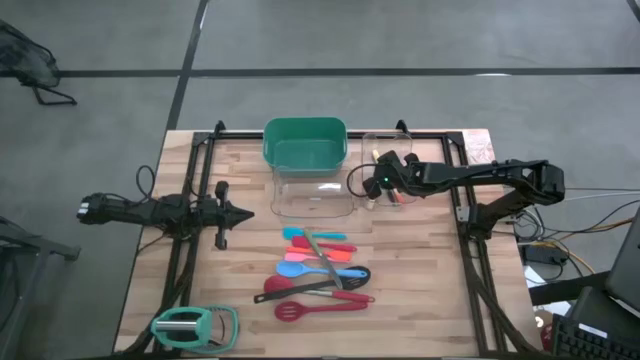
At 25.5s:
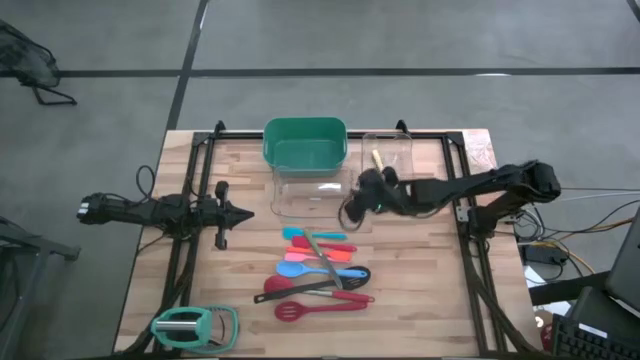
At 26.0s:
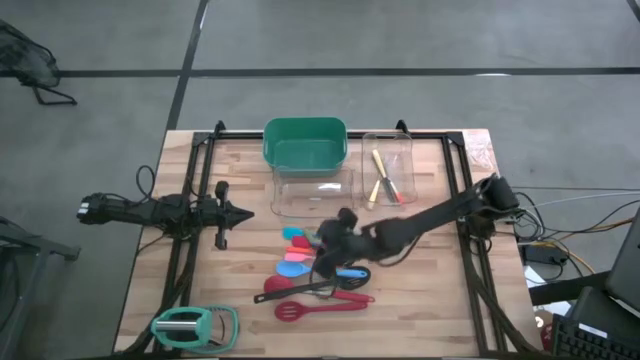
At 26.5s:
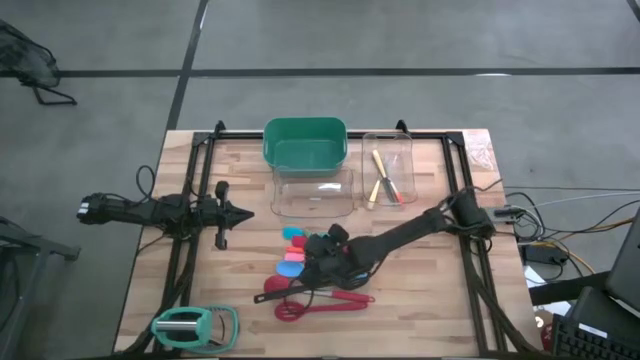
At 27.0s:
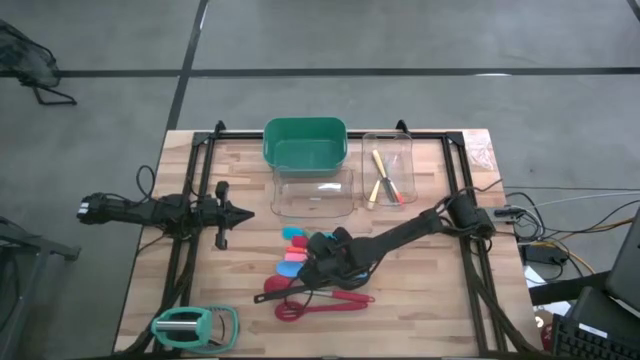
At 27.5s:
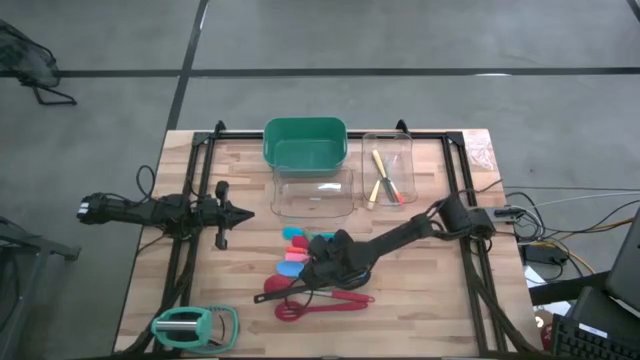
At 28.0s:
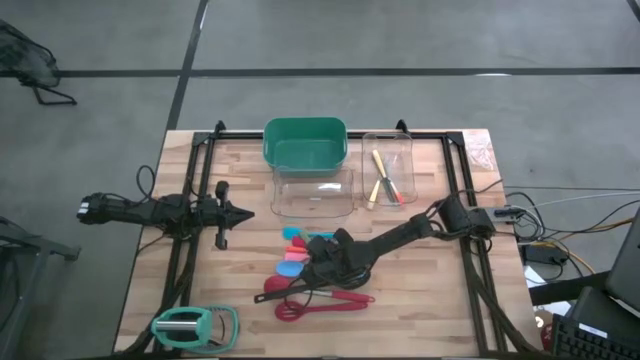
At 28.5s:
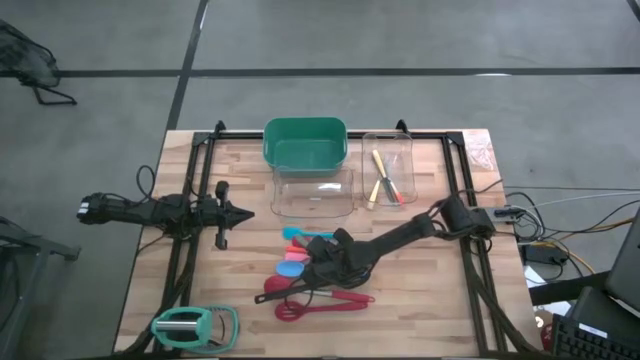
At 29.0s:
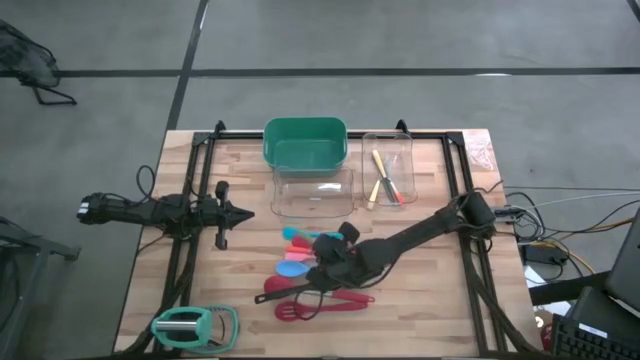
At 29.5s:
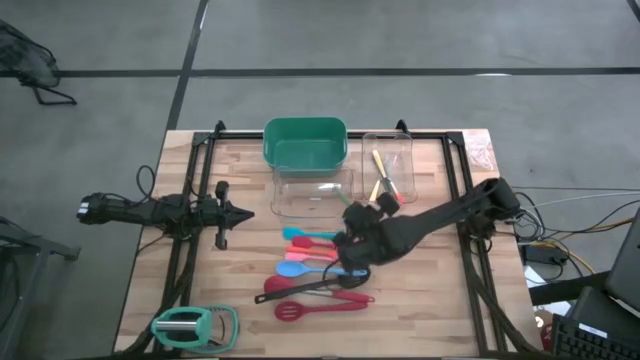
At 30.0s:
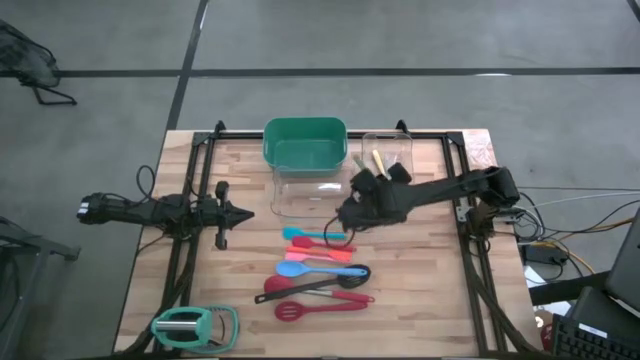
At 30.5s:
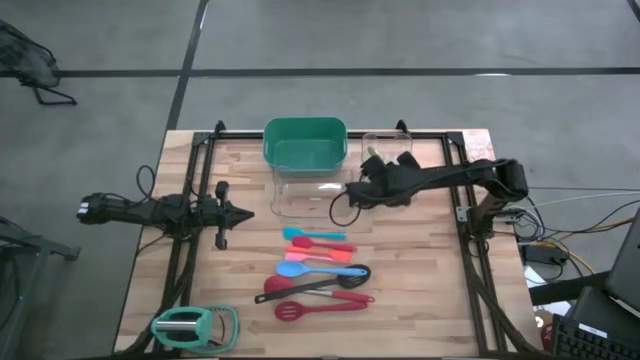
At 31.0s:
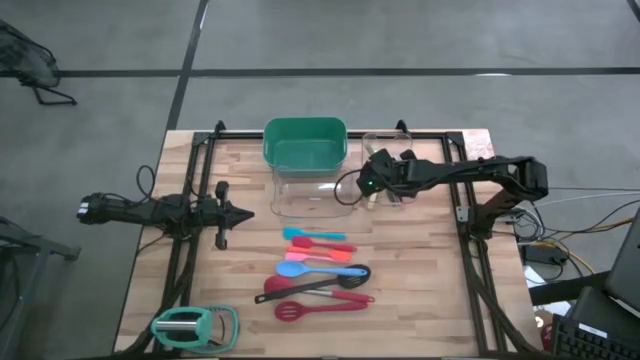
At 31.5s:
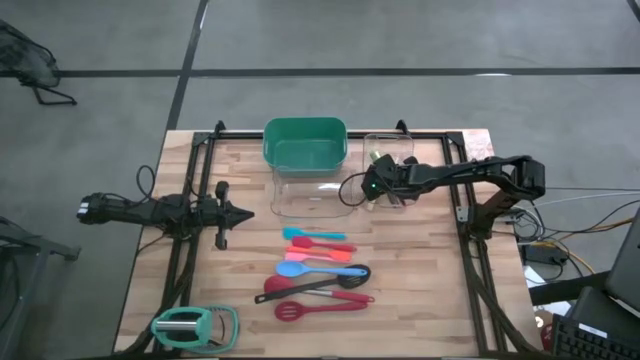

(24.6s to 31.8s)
Task: Pick & Place Kitchen Items
Put the green knife into the right transparent bin

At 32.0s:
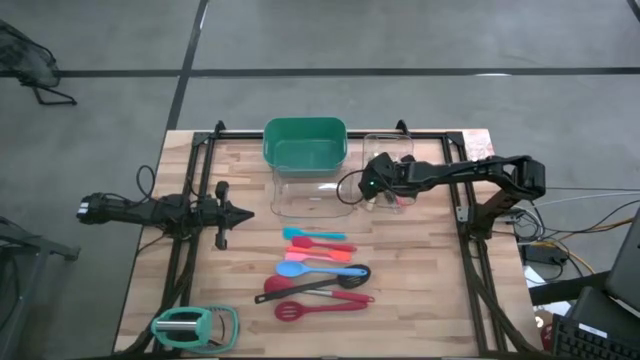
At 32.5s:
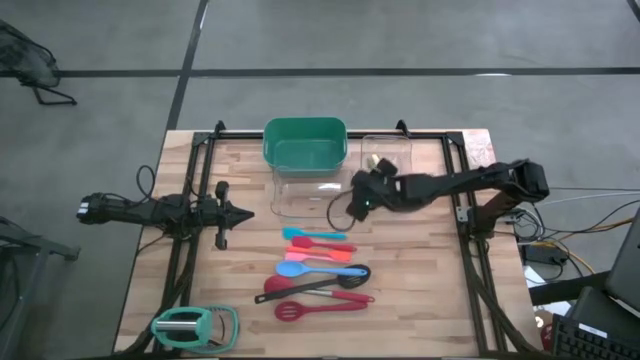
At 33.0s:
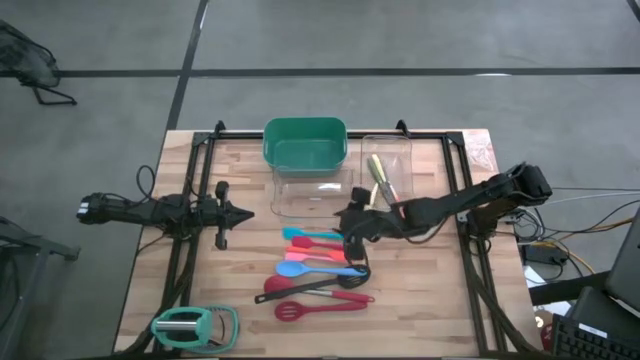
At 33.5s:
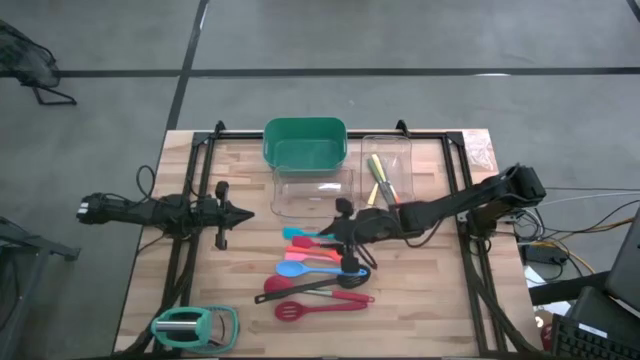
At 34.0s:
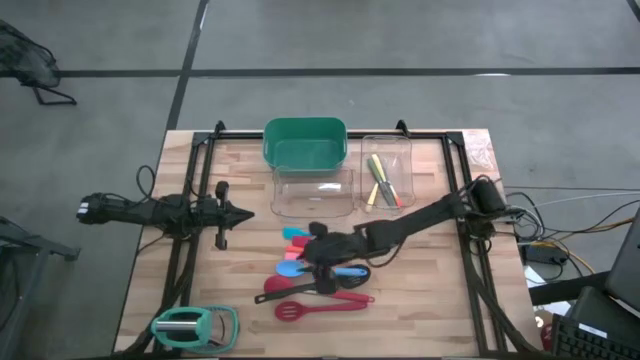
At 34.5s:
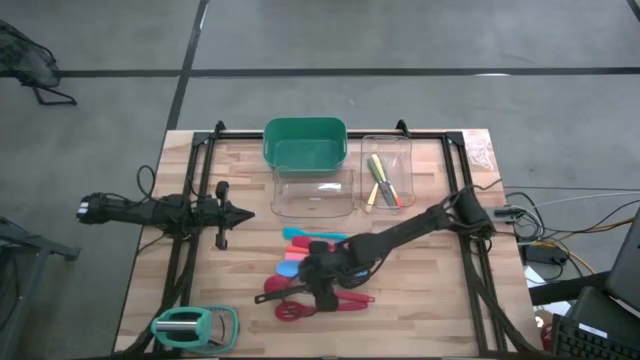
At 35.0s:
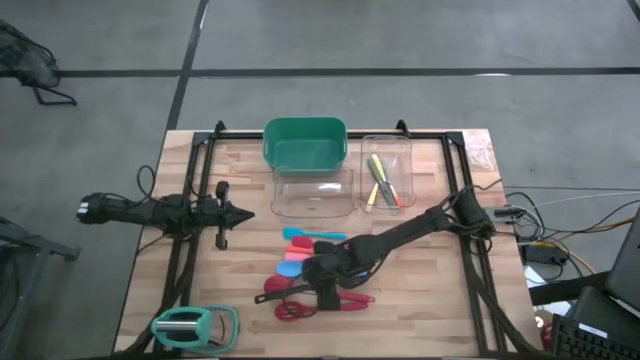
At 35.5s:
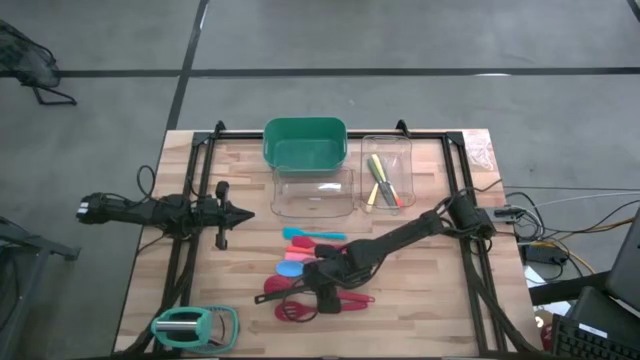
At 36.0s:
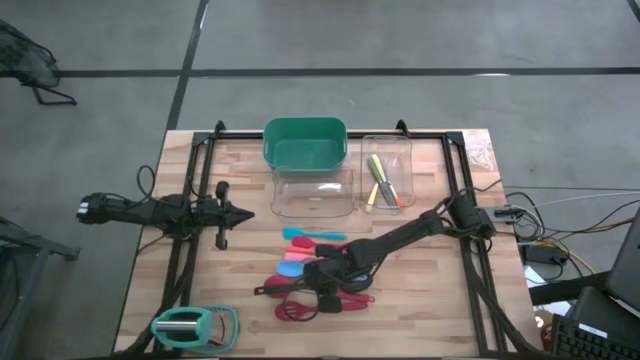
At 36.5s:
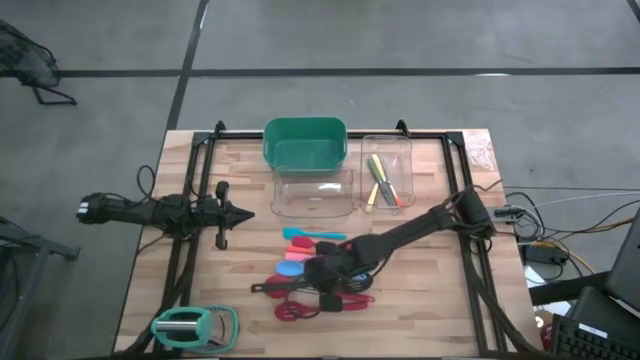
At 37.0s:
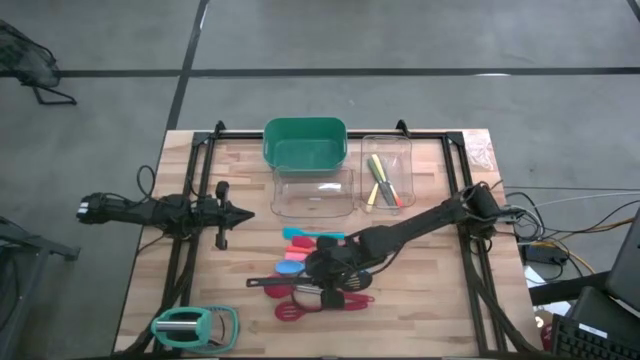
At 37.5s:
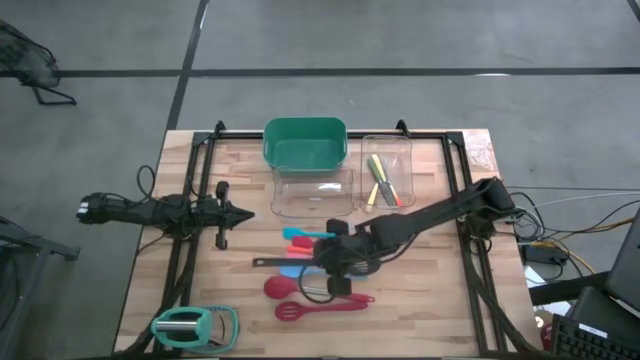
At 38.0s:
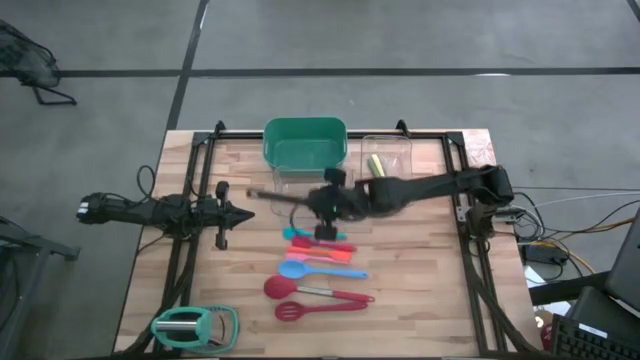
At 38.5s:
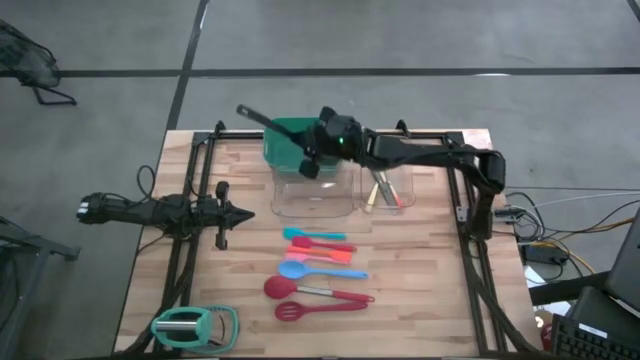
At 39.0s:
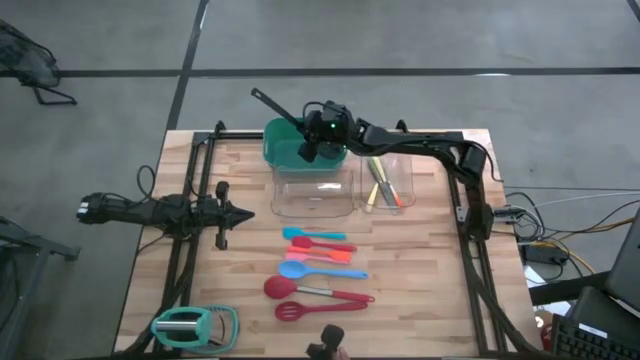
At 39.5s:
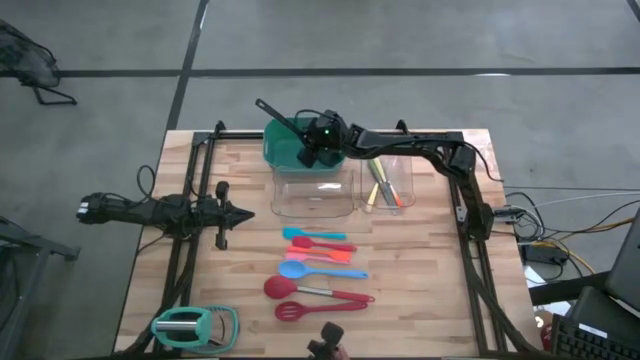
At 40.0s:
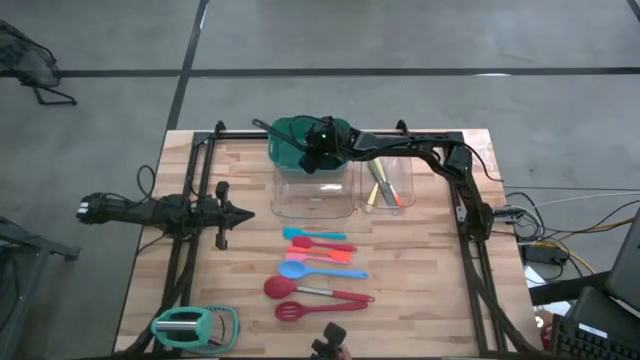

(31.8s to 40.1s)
Put the black slotted spoon into the green bin

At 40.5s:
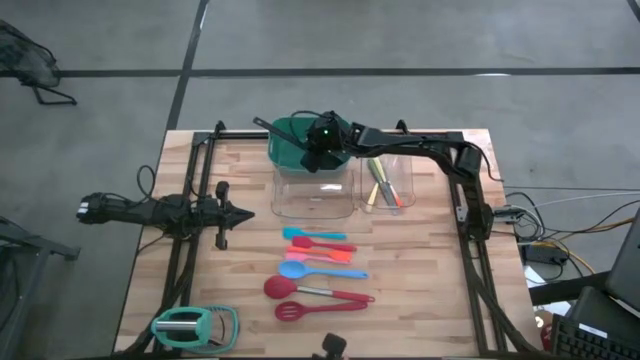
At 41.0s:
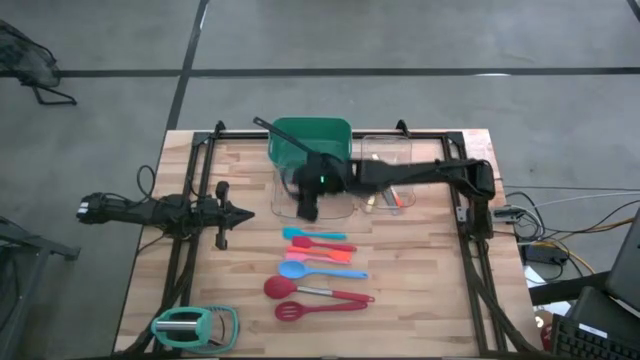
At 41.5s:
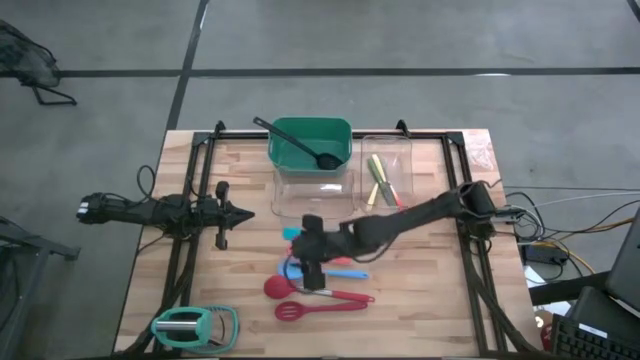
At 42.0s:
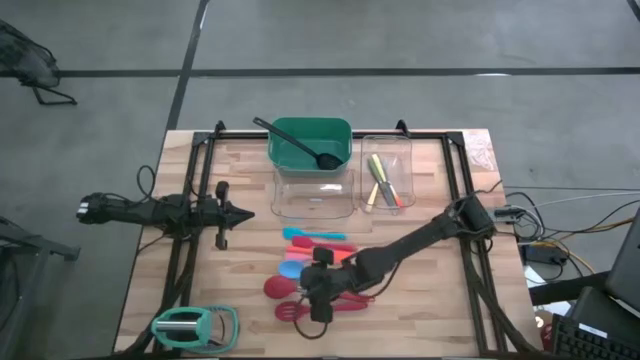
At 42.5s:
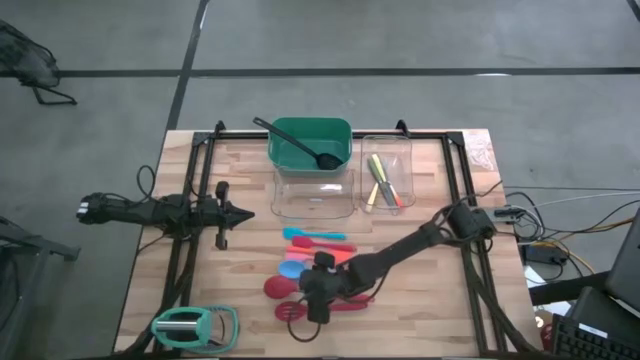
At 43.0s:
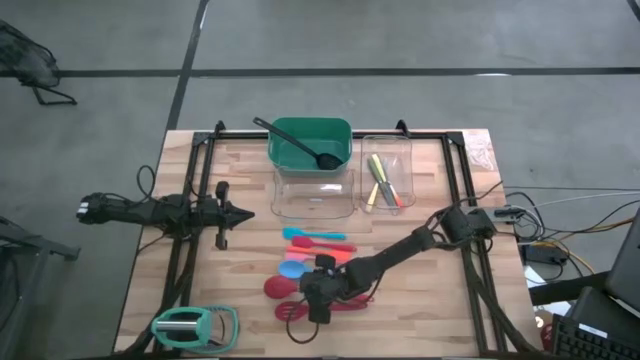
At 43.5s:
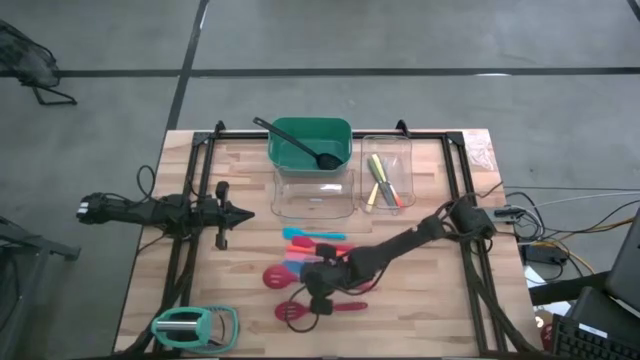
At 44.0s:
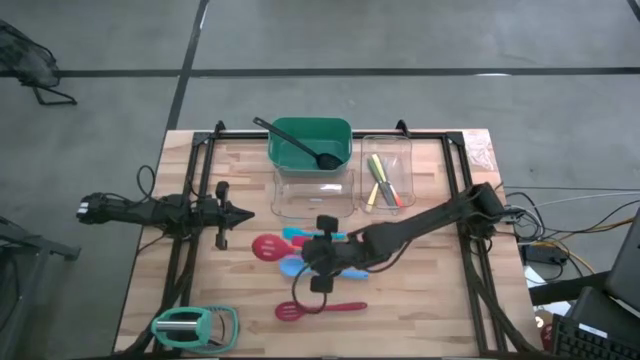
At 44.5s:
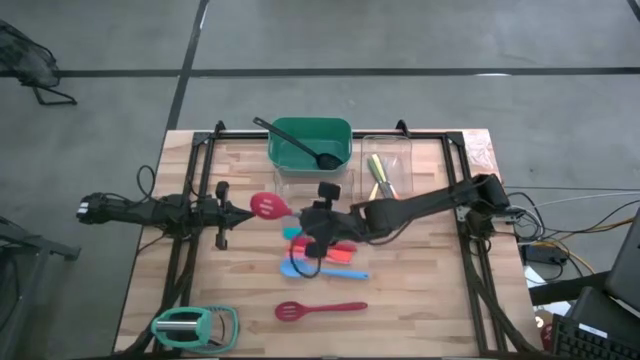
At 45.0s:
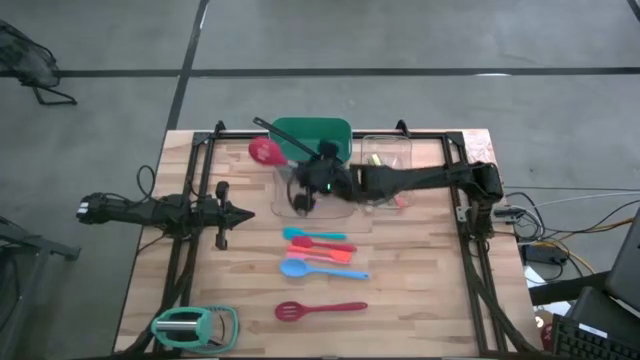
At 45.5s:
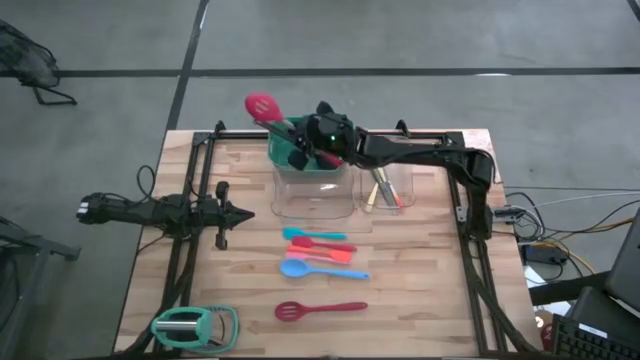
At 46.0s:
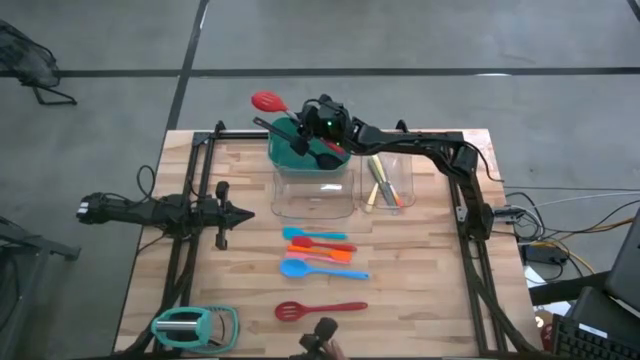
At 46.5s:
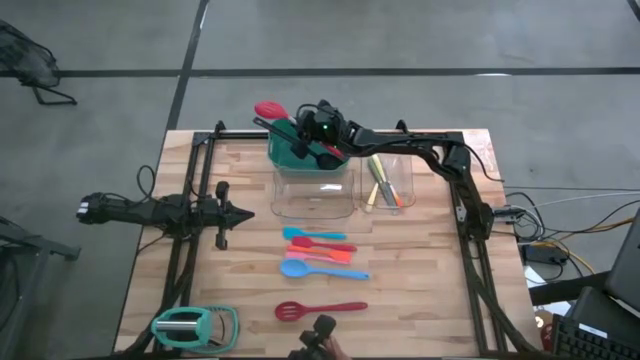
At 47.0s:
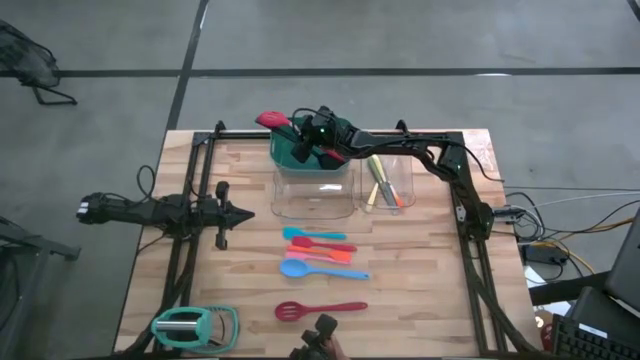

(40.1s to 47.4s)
Put the red slotted spoon into the green bin
